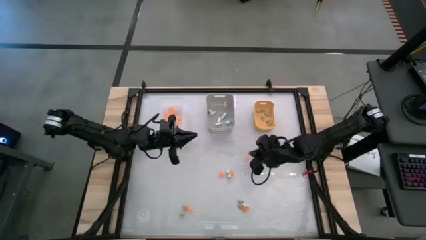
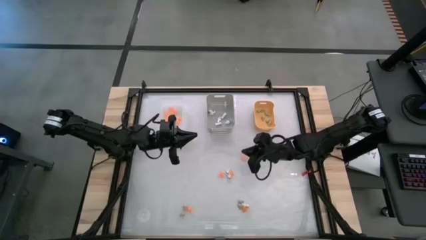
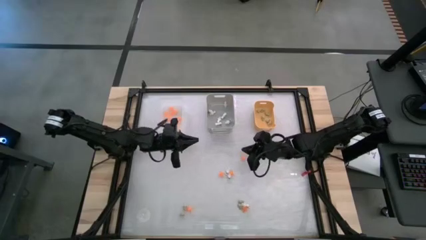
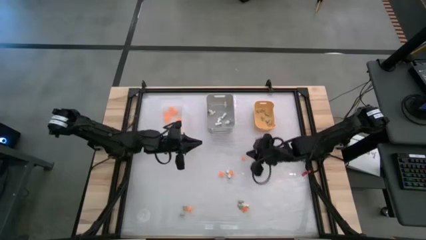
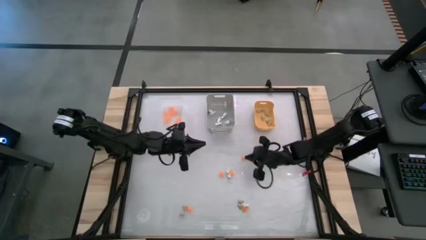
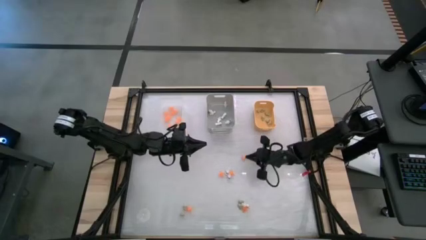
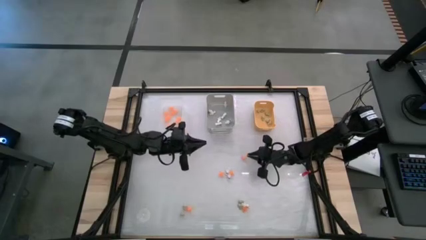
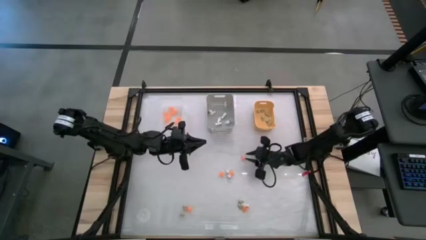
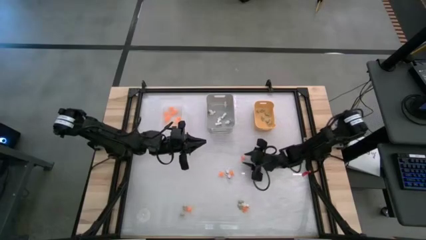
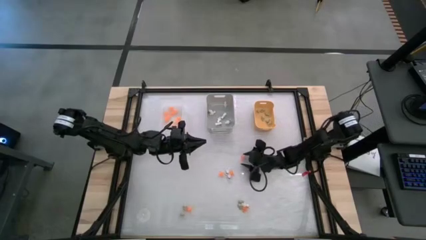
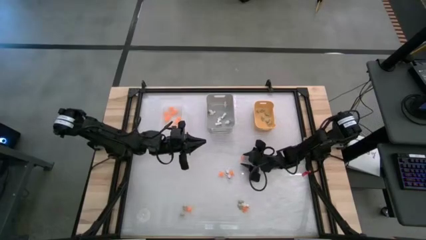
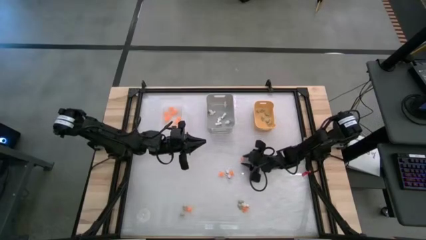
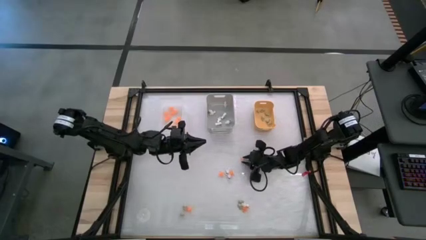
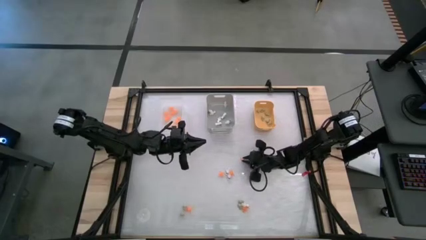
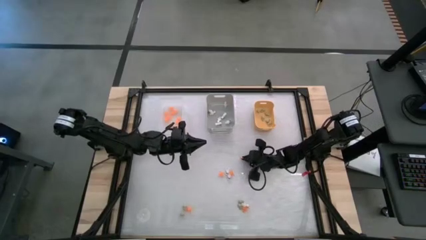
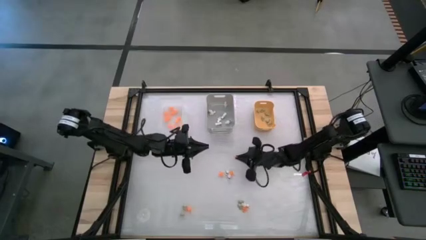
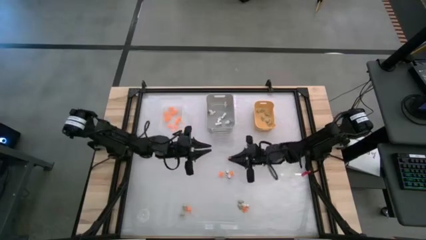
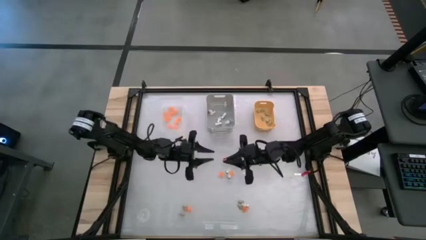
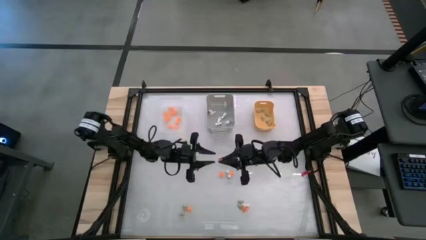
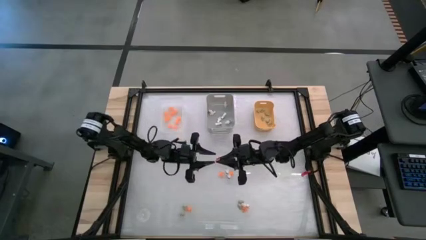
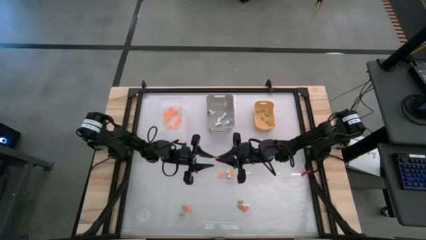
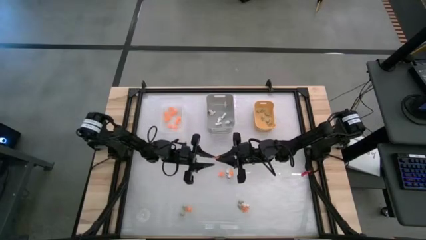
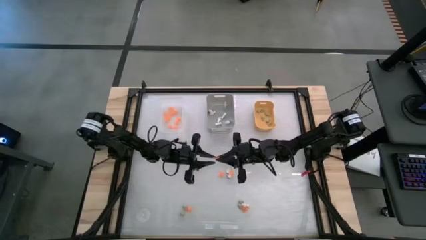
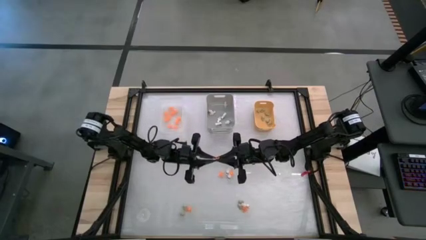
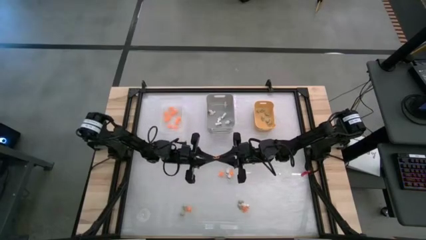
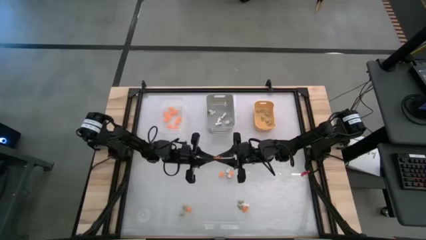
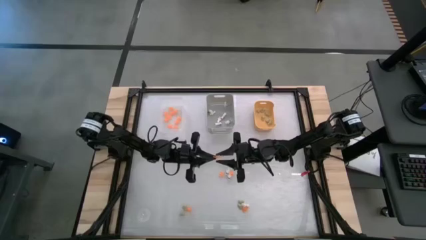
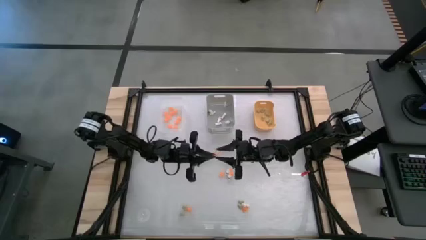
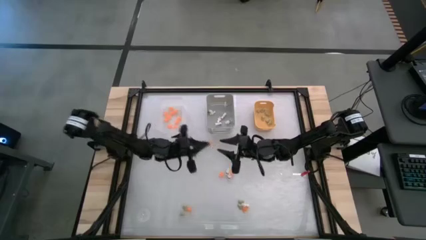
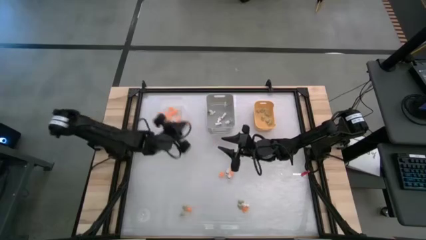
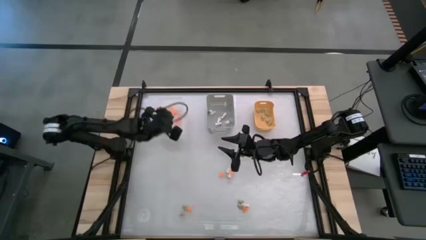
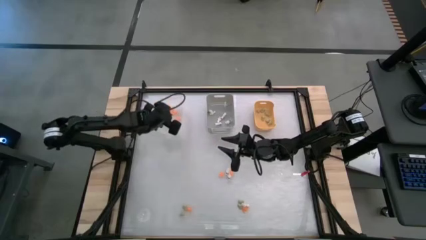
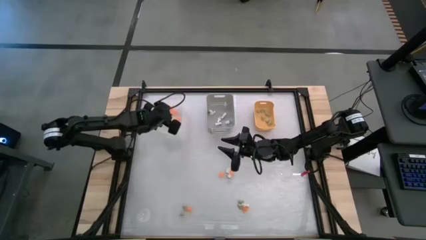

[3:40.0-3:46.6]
Task: Sort Halloween decoration
Put the orange spider toy into the transparent white bin

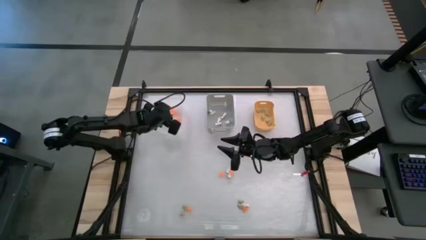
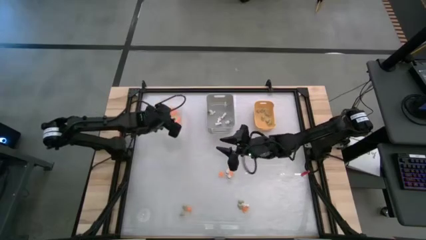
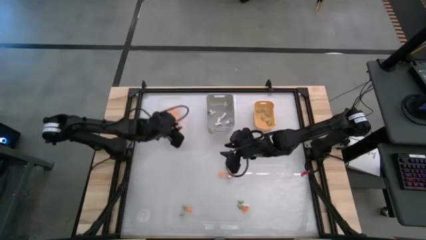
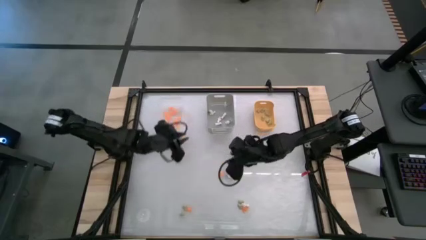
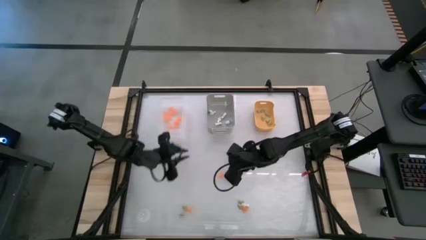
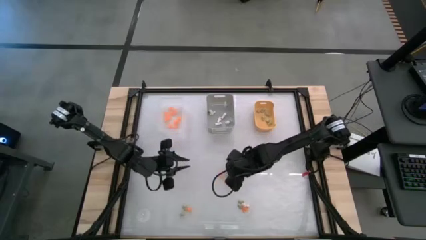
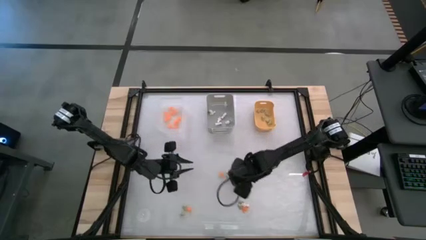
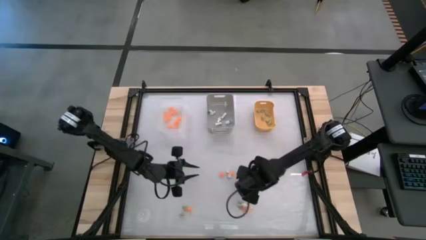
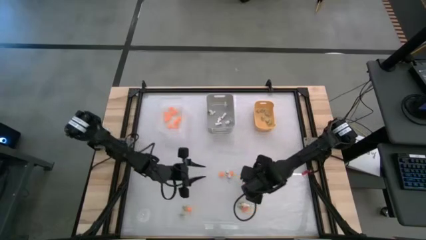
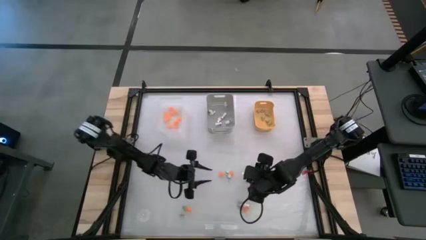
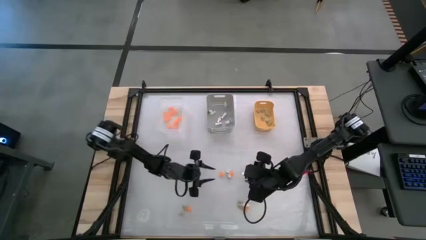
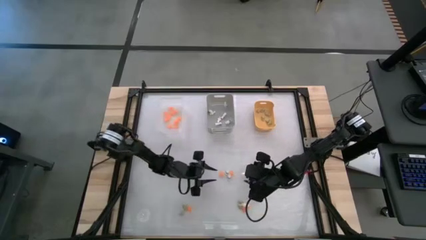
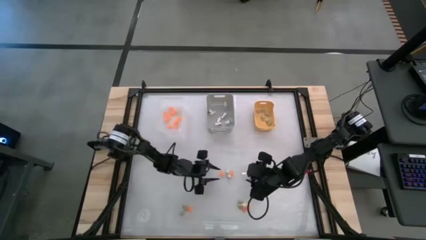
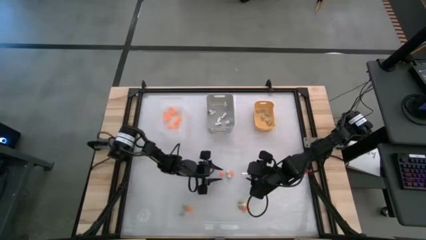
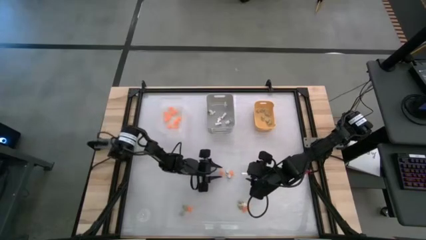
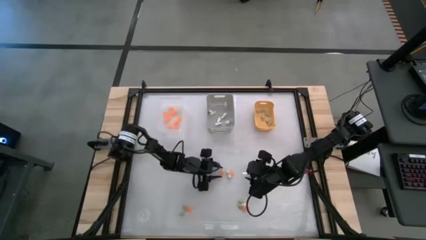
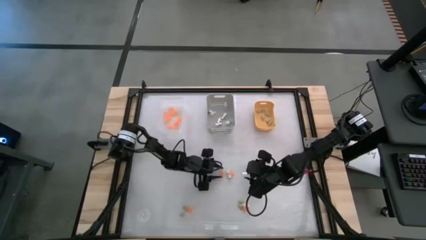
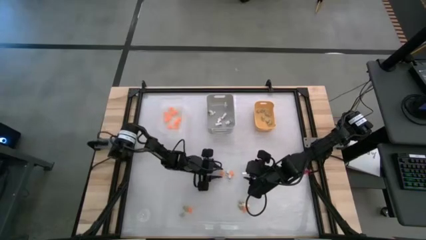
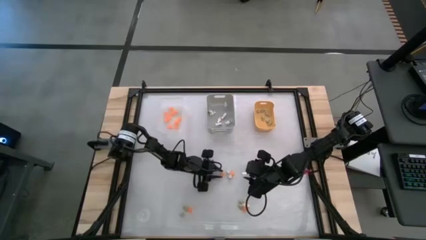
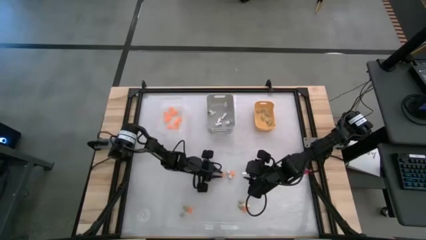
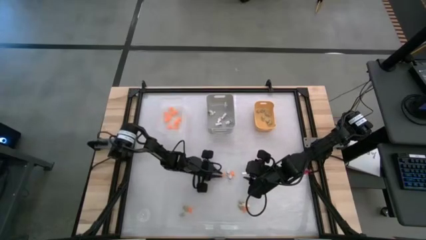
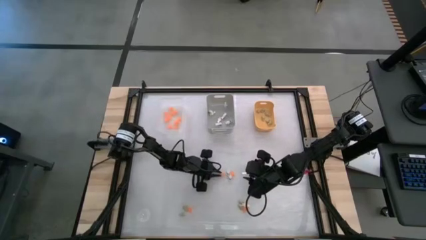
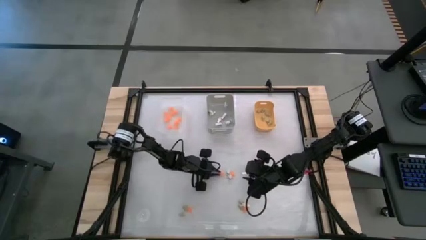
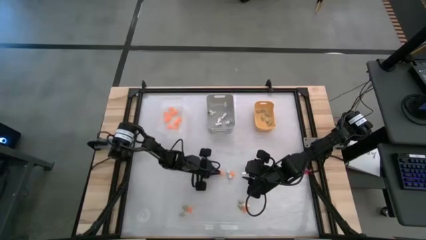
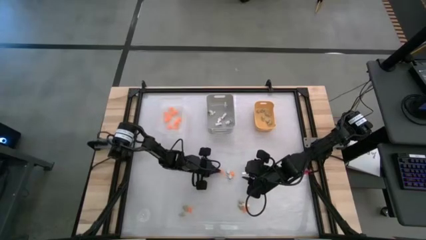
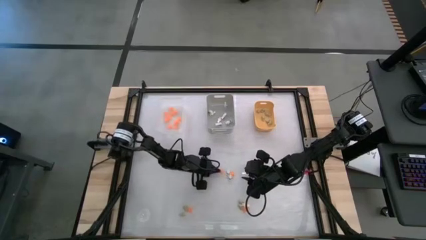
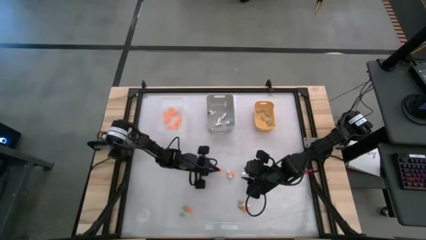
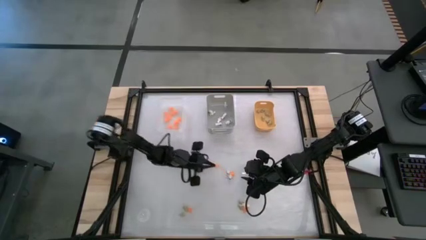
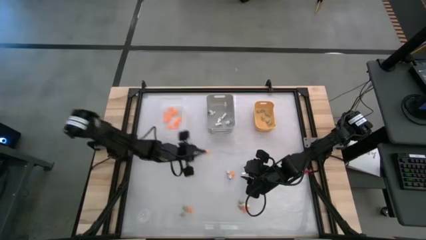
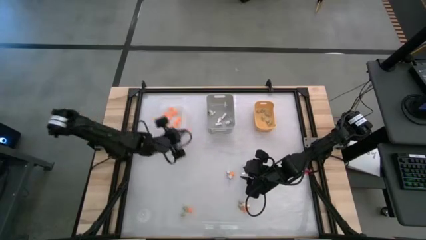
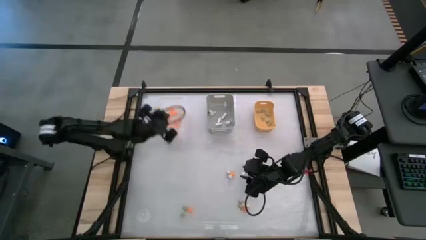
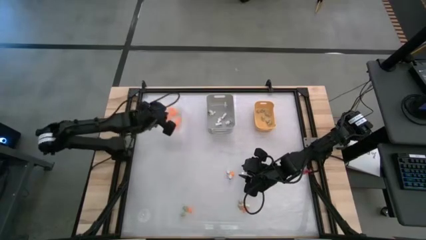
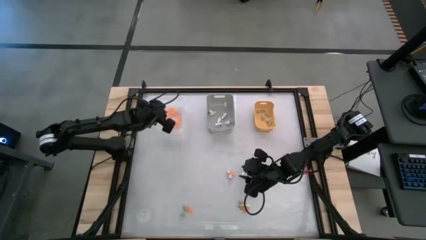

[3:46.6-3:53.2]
Put the orange spider toy into the transparent white bin

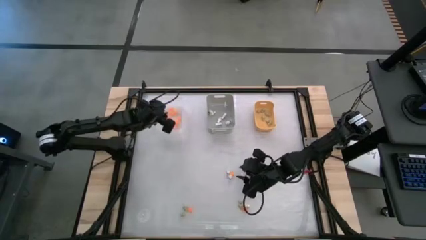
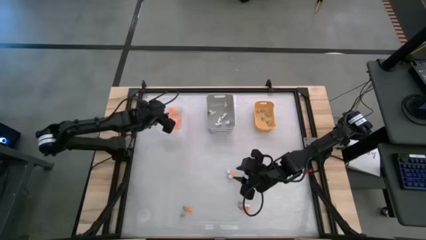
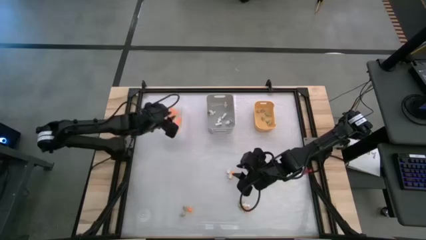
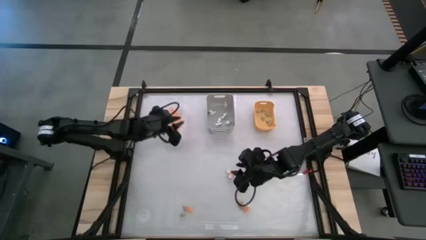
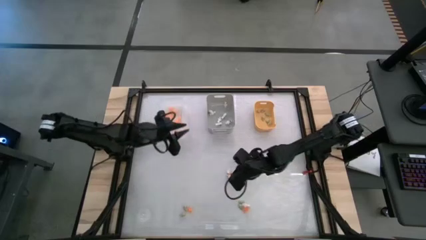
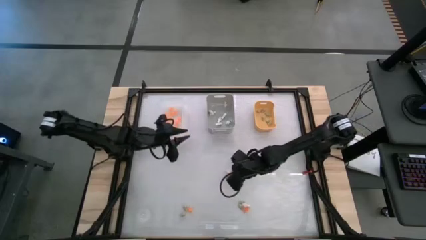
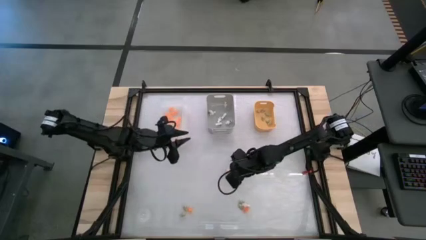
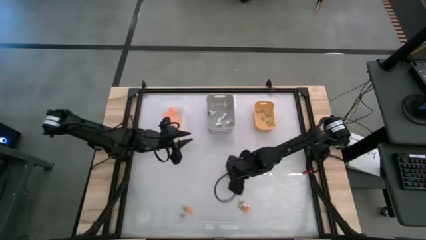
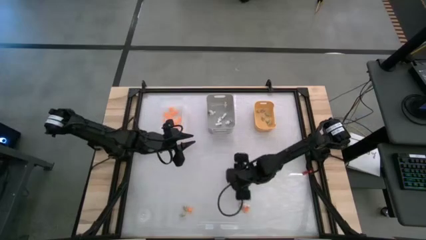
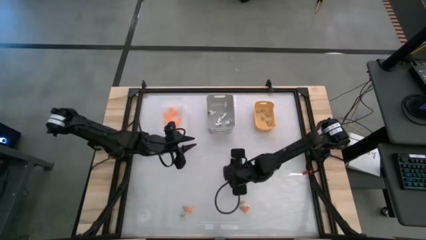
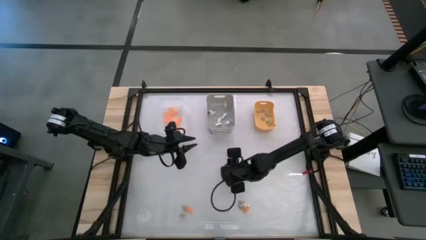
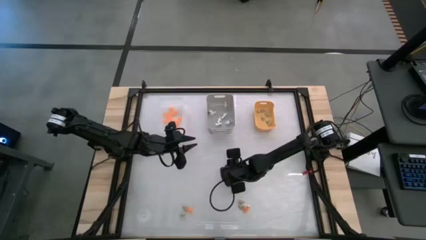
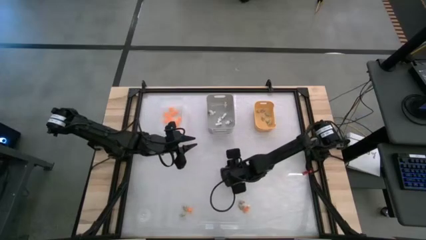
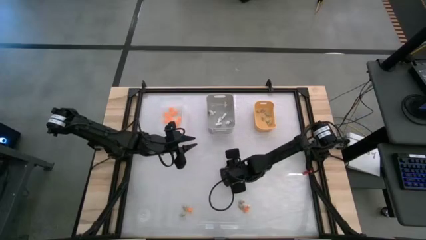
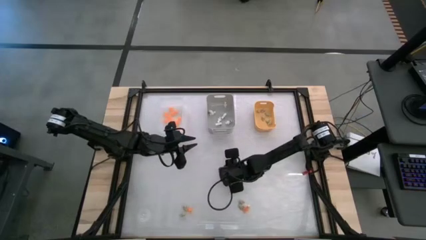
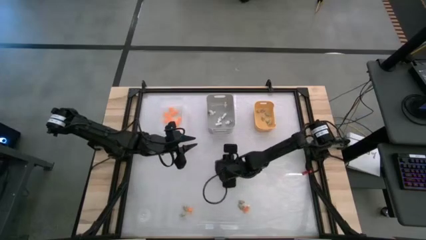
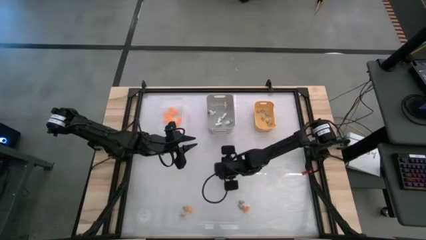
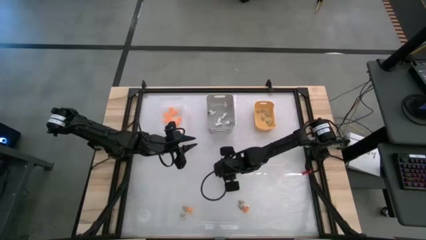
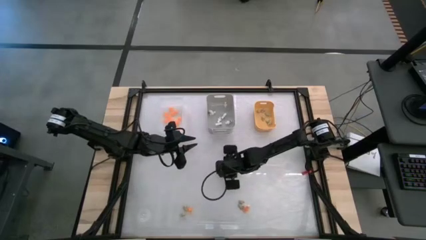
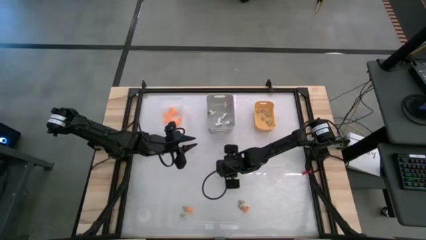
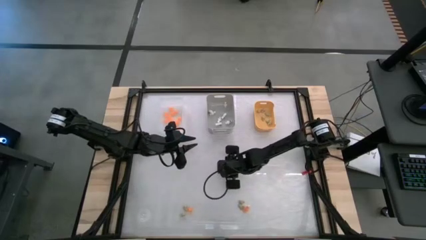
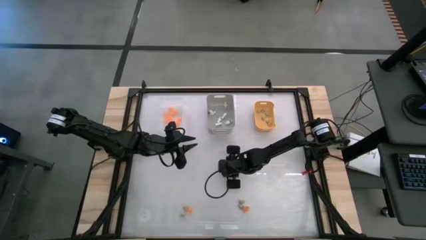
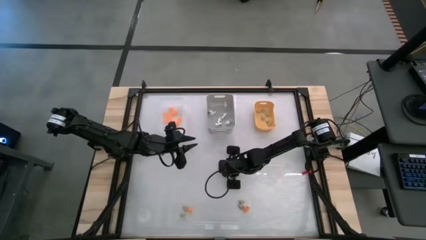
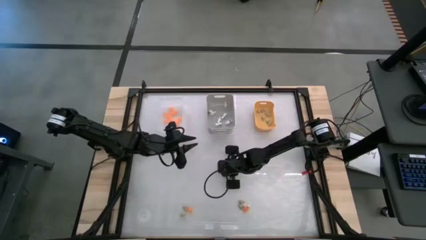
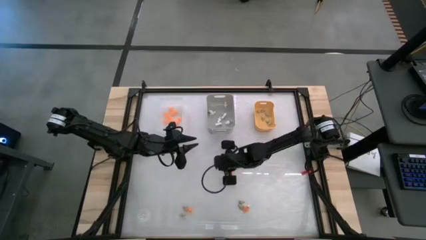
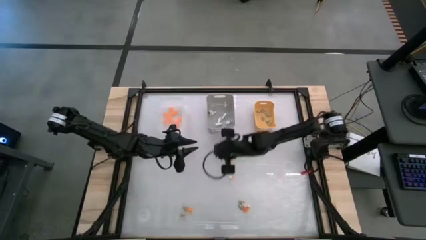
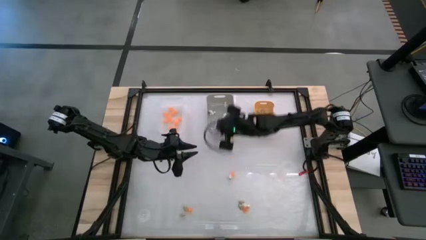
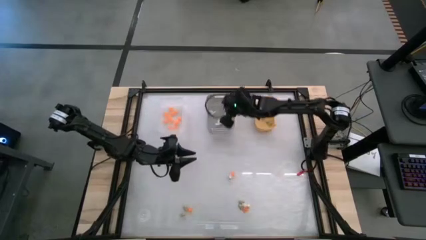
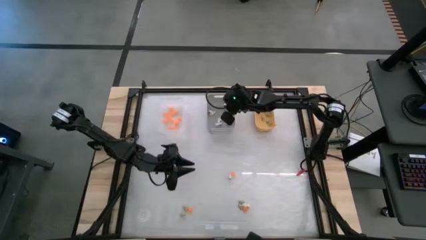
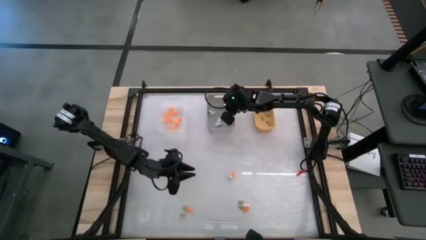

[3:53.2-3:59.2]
Put the white skeleton toy into the gray bin
